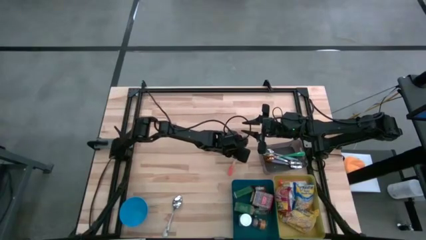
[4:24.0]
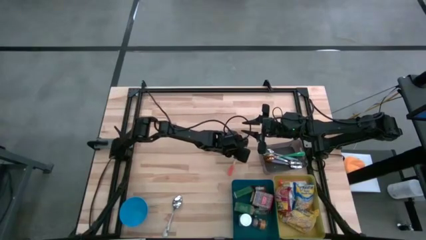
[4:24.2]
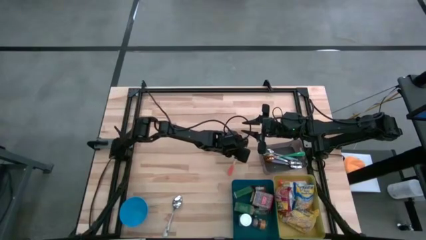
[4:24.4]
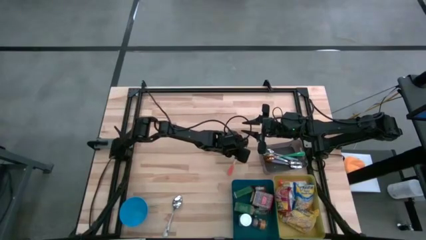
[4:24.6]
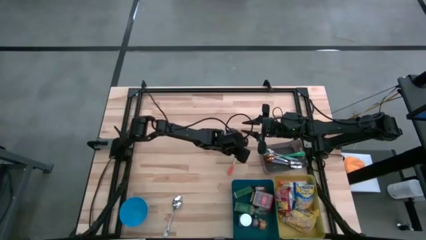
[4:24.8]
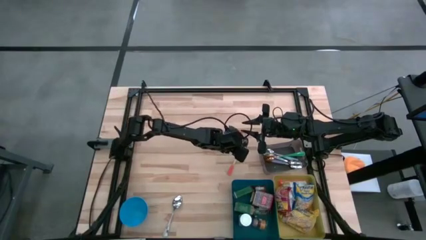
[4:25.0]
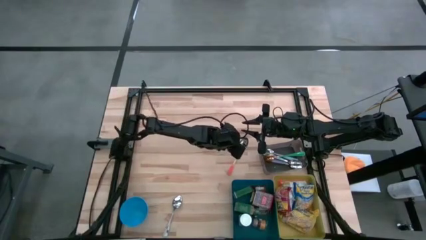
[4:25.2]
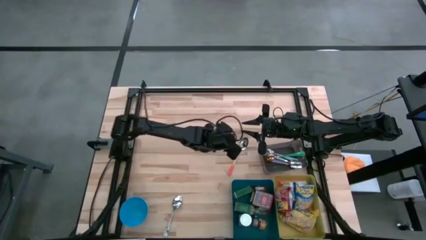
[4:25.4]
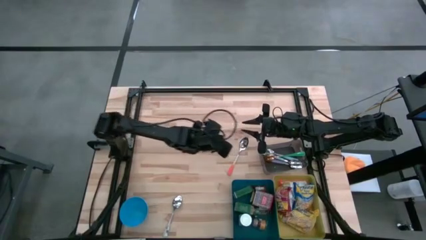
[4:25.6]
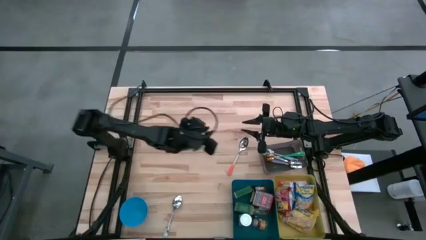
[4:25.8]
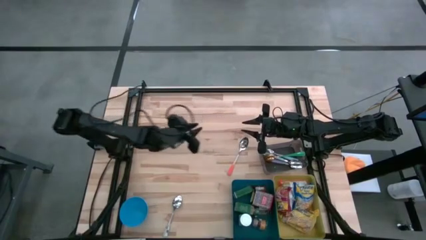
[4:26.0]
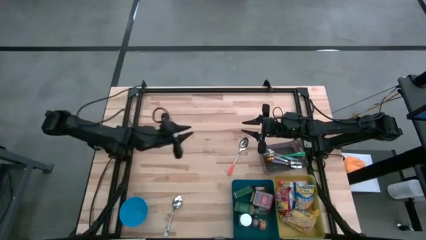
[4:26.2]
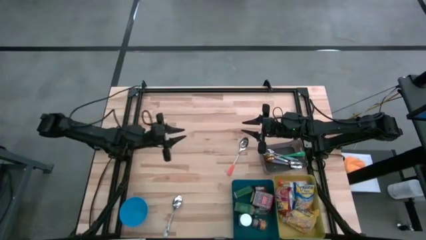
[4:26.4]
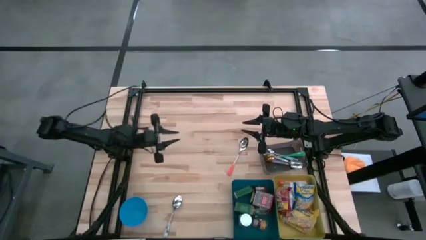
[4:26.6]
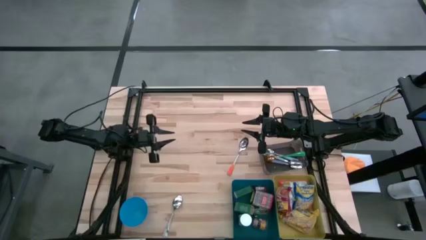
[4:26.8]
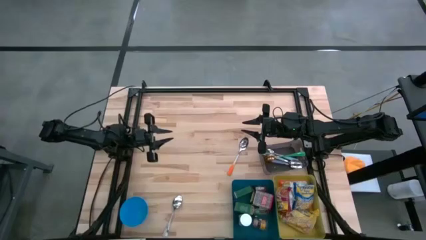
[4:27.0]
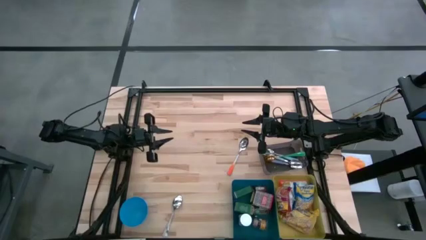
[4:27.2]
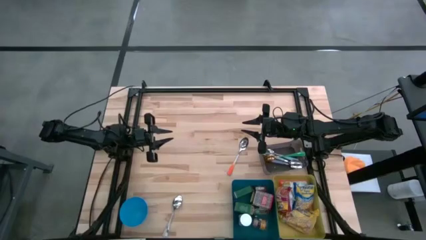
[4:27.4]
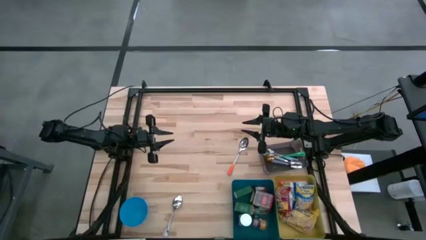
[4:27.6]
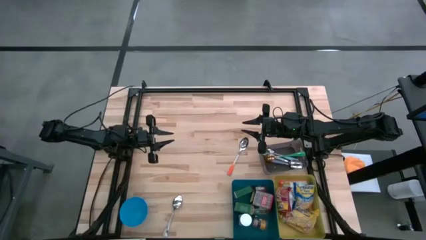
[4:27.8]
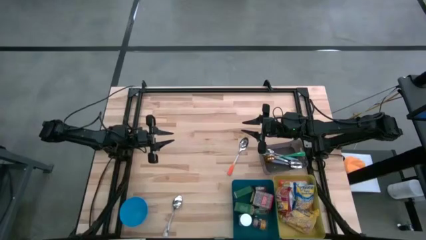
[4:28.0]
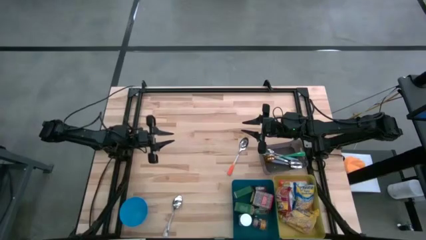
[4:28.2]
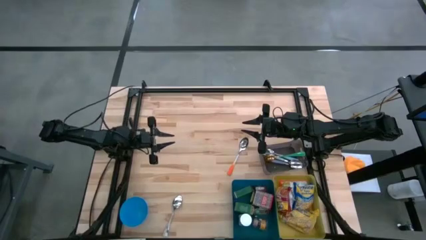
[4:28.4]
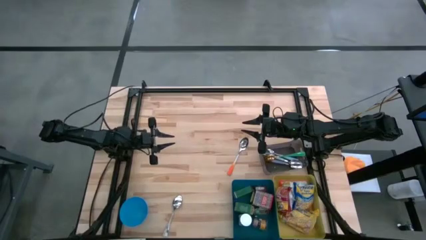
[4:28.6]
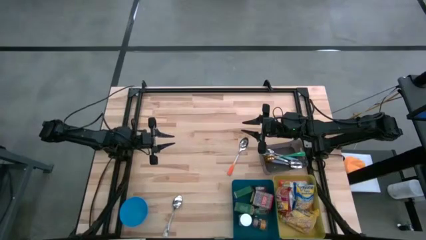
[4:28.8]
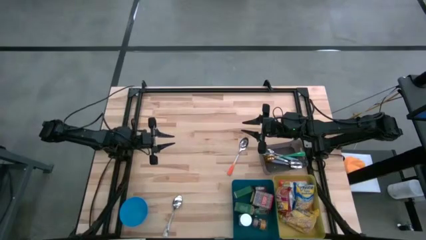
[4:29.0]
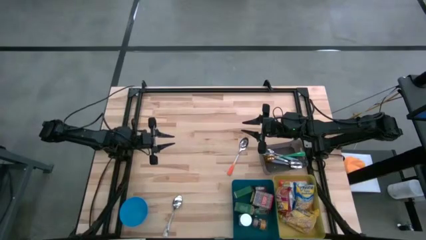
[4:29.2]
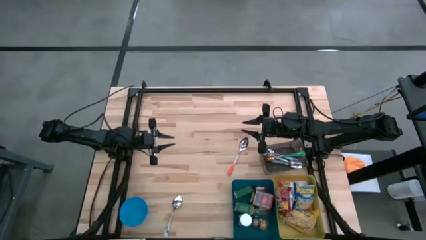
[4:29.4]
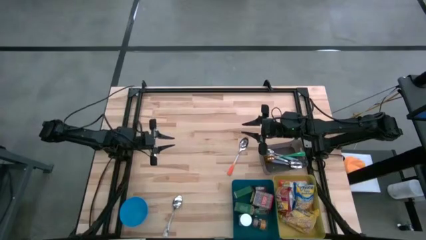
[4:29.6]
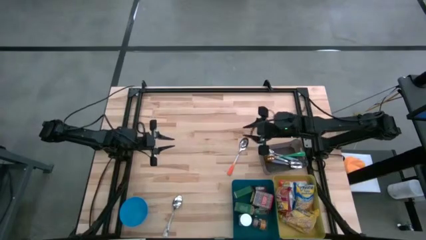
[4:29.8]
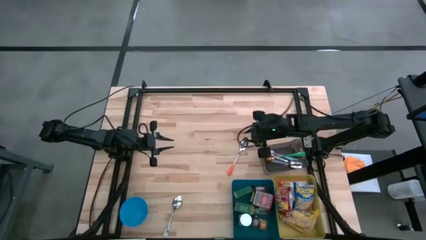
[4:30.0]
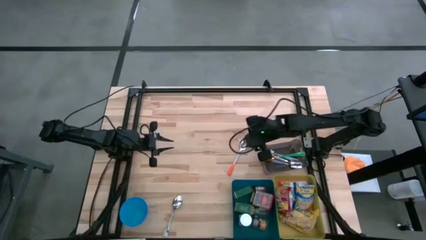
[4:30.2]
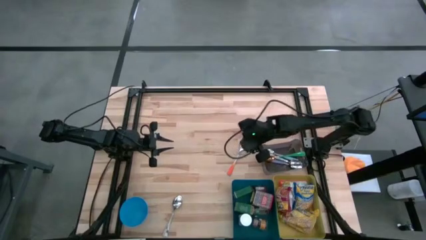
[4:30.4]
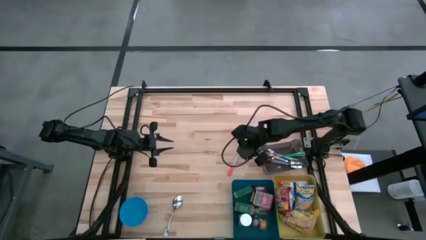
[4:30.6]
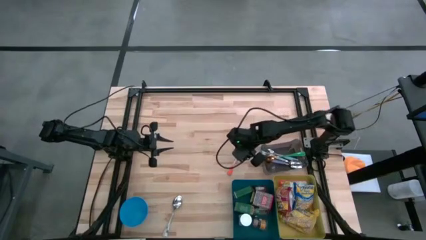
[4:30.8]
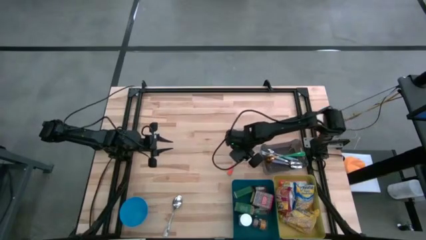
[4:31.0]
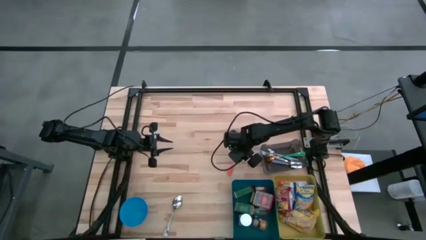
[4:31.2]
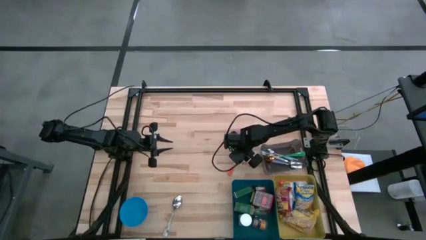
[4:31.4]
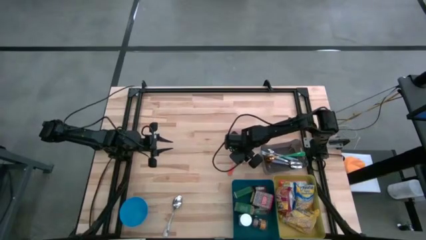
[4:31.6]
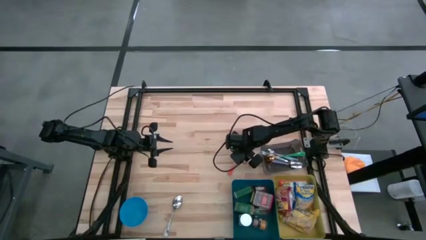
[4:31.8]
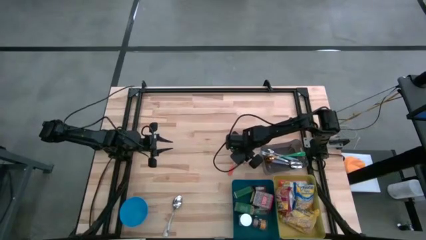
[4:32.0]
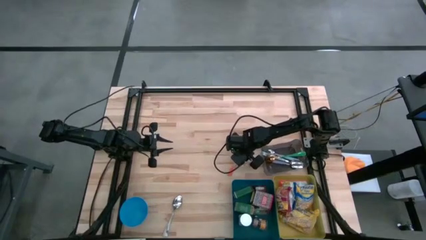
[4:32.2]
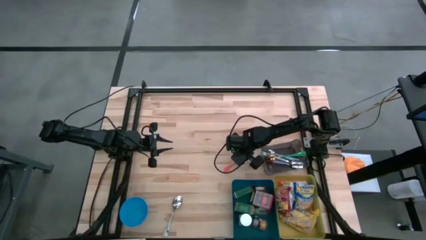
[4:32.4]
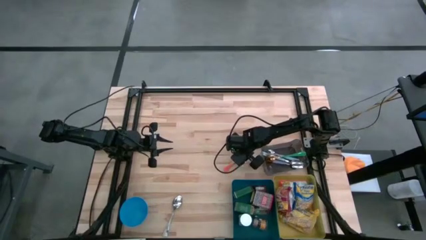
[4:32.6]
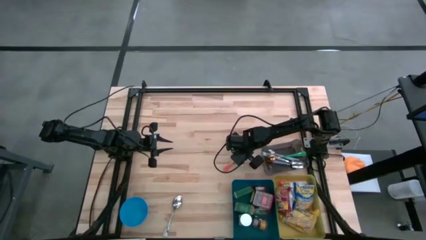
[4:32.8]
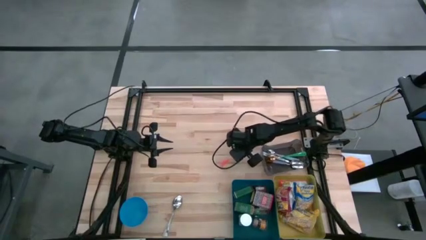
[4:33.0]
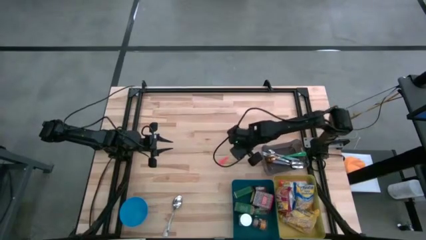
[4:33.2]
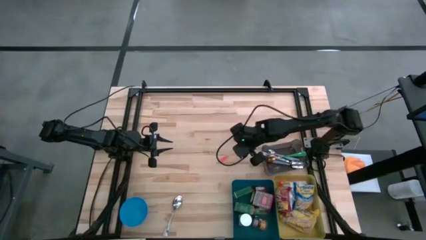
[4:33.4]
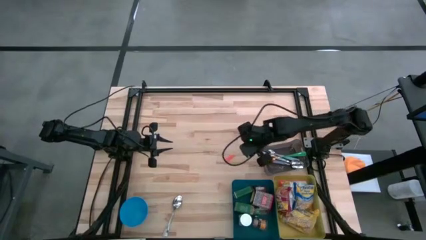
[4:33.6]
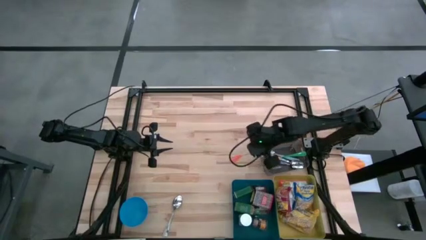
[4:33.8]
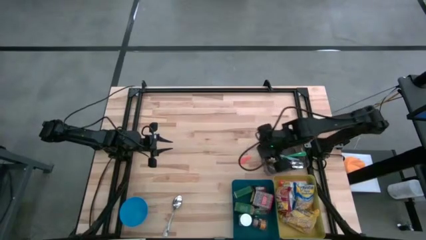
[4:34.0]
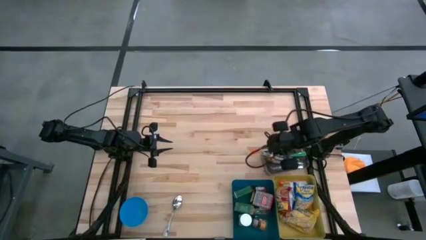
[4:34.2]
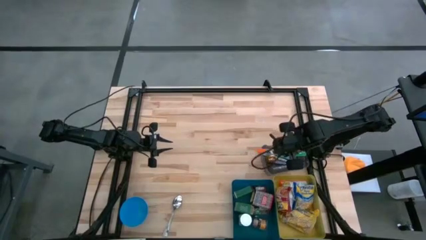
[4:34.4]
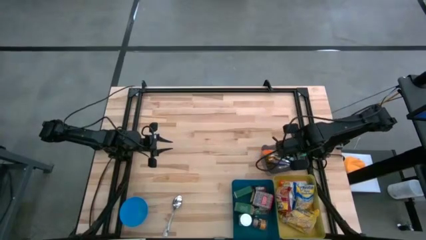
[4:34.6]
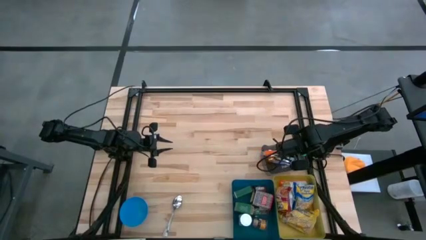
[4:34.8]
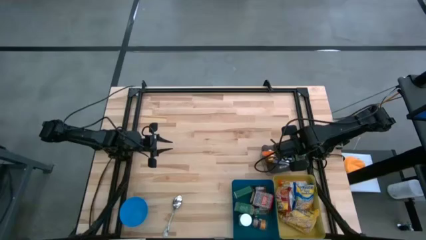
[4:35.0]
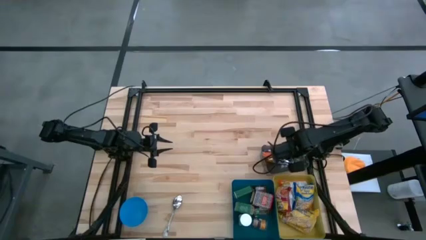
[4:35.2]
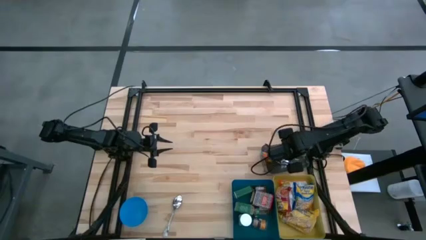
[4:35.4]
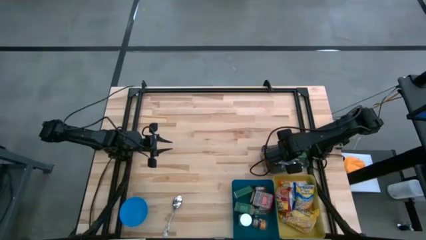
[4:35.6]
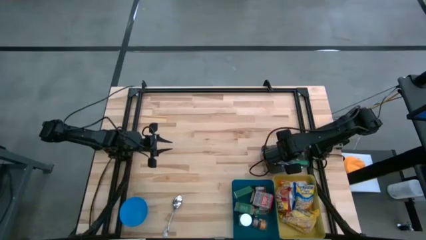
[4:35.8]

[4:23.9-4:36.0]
Put the orange spoon into the black bin
